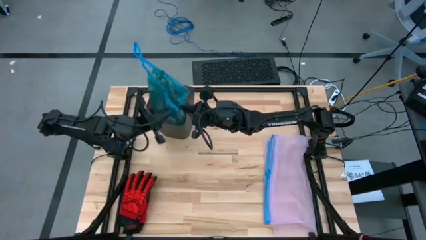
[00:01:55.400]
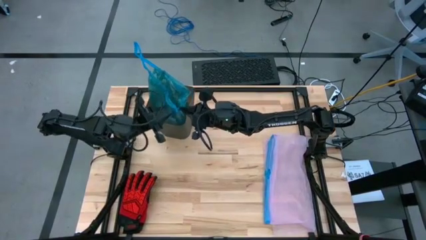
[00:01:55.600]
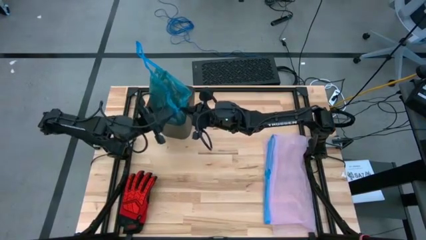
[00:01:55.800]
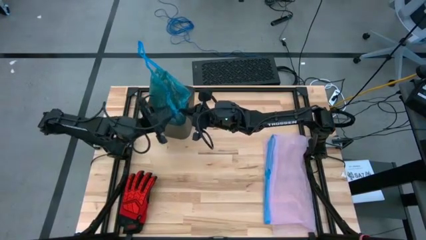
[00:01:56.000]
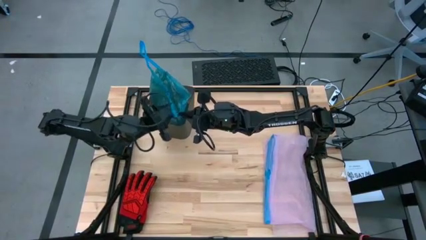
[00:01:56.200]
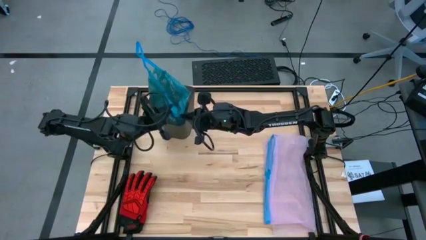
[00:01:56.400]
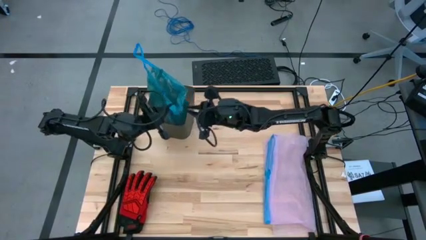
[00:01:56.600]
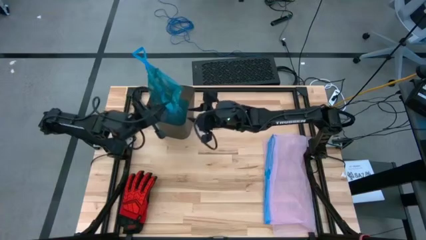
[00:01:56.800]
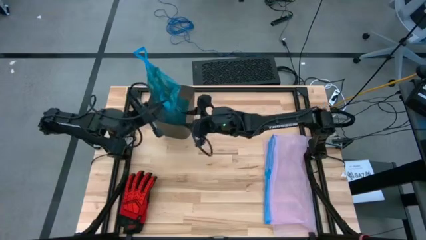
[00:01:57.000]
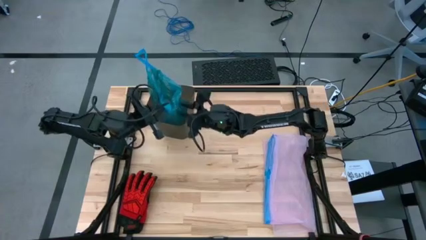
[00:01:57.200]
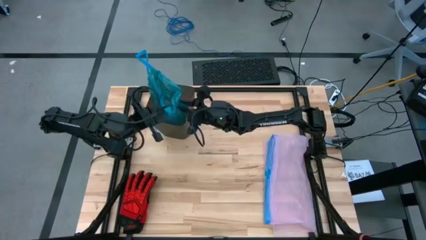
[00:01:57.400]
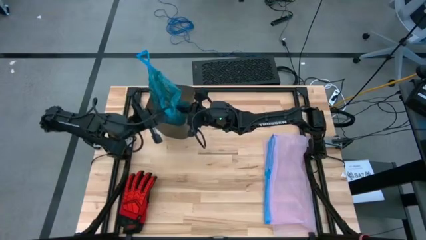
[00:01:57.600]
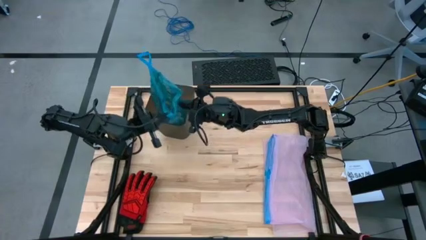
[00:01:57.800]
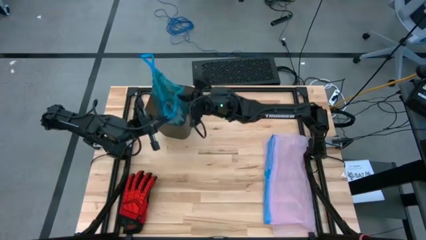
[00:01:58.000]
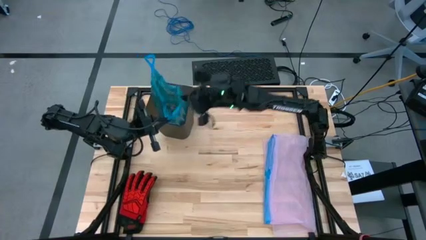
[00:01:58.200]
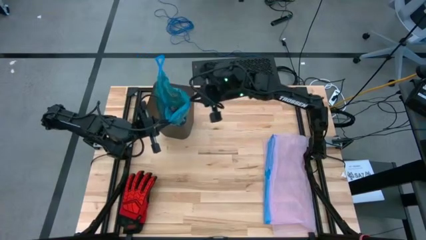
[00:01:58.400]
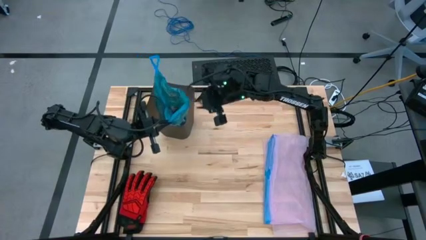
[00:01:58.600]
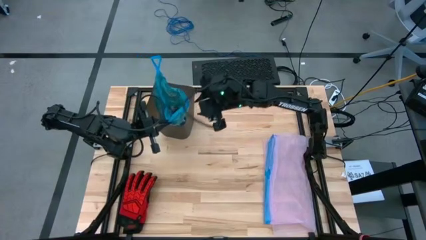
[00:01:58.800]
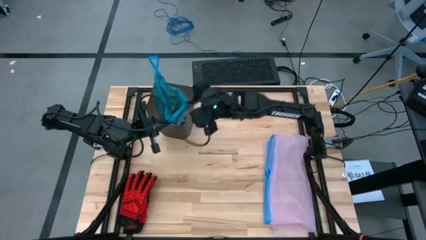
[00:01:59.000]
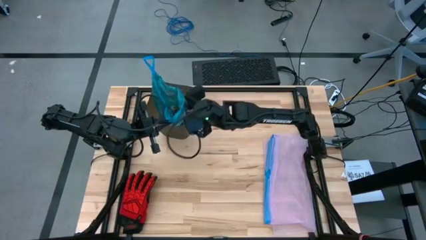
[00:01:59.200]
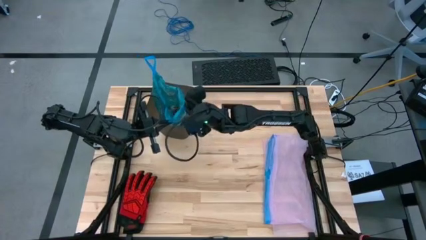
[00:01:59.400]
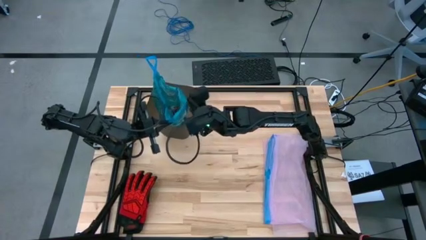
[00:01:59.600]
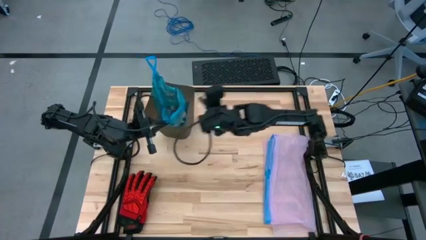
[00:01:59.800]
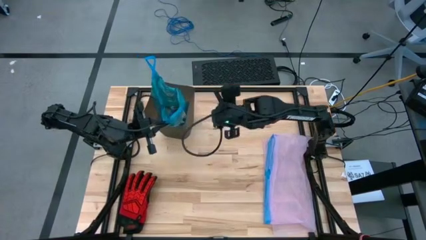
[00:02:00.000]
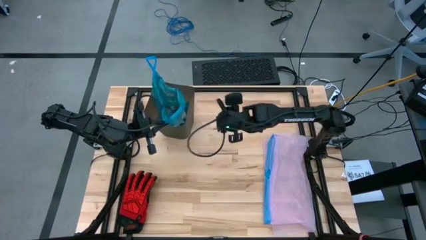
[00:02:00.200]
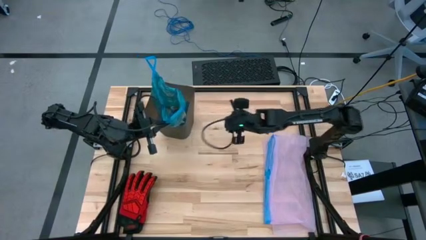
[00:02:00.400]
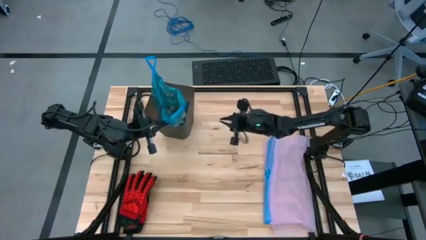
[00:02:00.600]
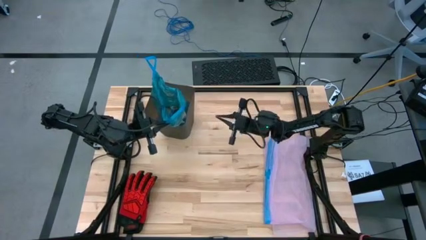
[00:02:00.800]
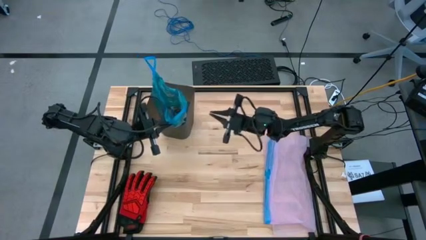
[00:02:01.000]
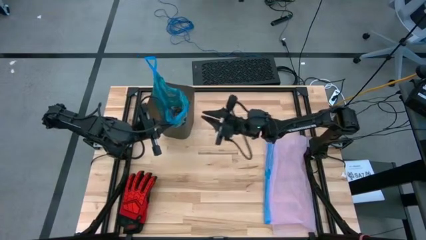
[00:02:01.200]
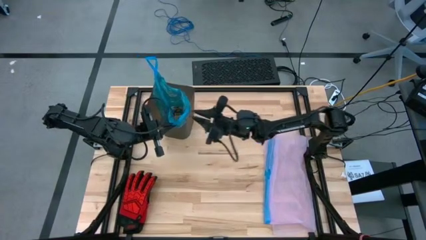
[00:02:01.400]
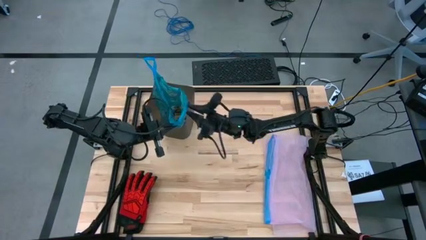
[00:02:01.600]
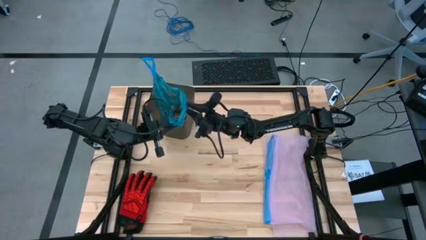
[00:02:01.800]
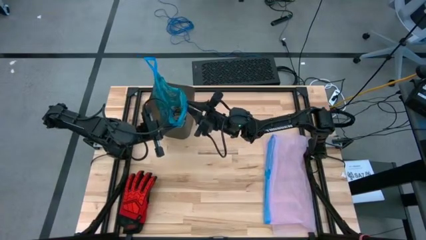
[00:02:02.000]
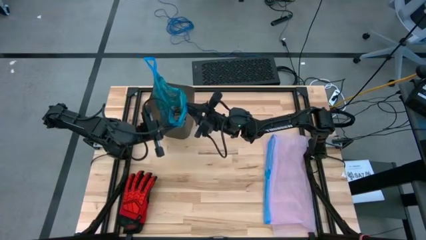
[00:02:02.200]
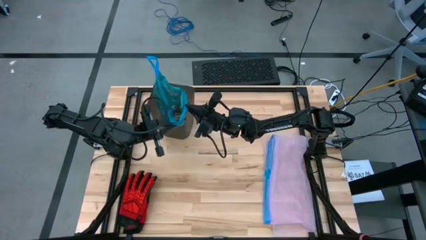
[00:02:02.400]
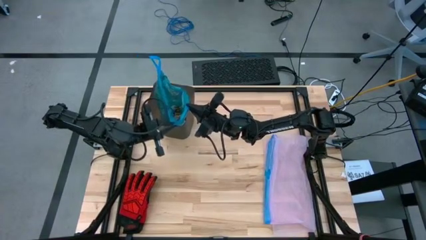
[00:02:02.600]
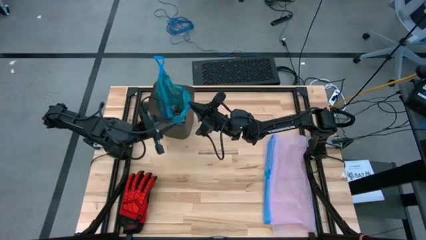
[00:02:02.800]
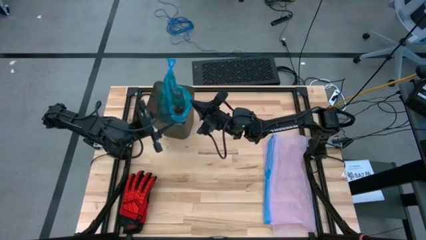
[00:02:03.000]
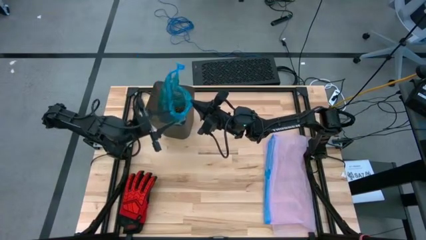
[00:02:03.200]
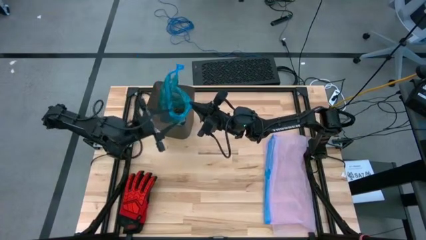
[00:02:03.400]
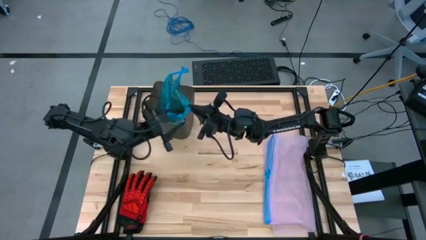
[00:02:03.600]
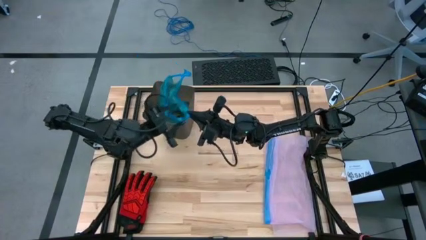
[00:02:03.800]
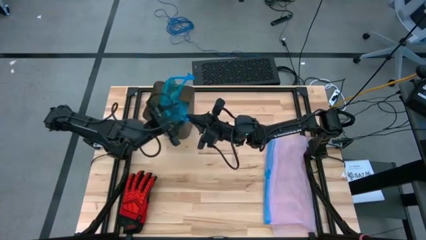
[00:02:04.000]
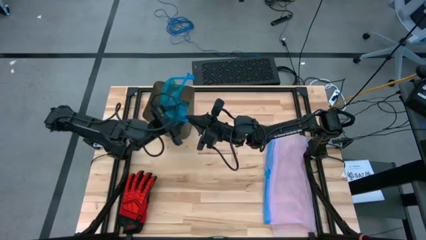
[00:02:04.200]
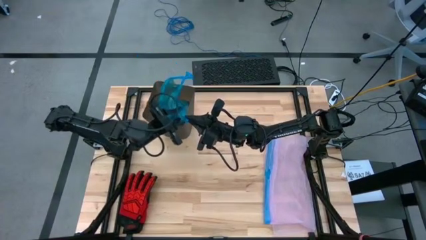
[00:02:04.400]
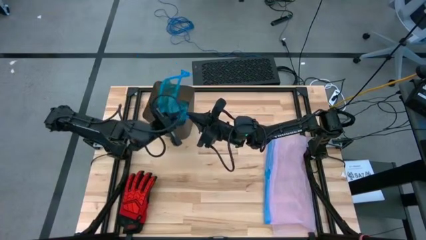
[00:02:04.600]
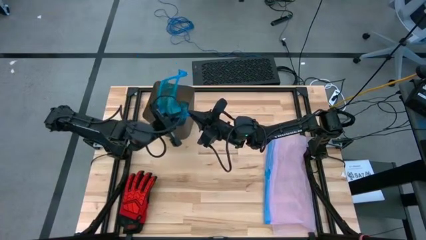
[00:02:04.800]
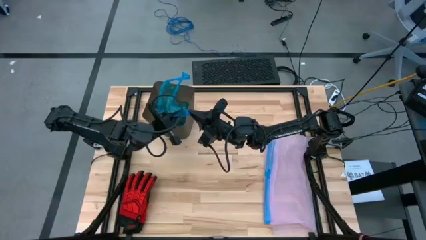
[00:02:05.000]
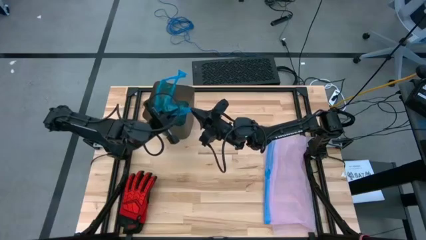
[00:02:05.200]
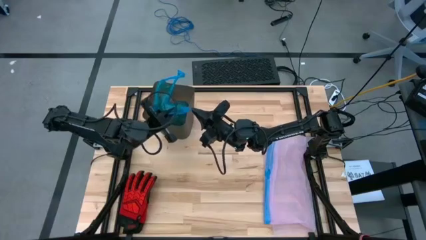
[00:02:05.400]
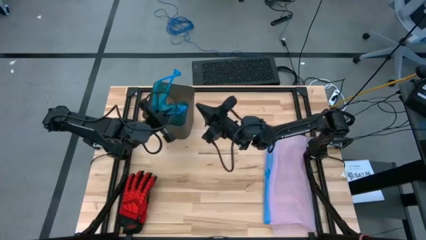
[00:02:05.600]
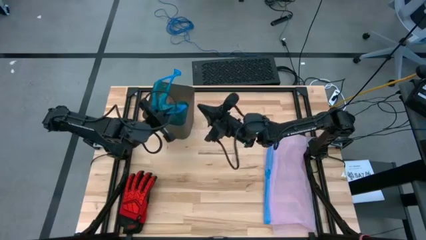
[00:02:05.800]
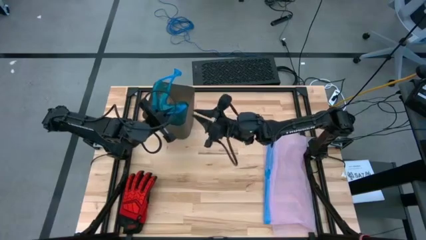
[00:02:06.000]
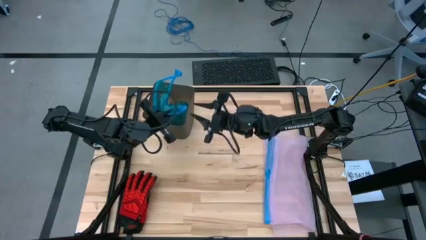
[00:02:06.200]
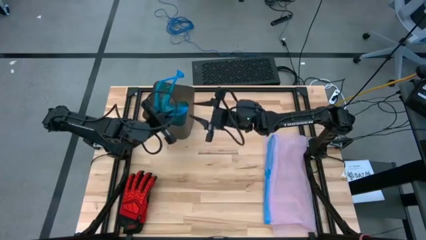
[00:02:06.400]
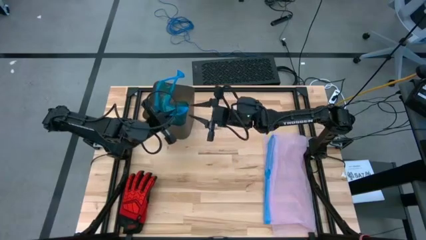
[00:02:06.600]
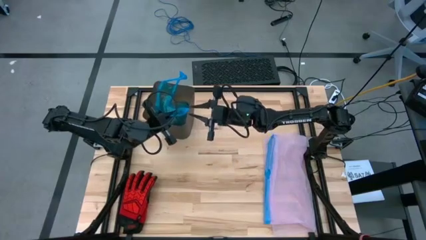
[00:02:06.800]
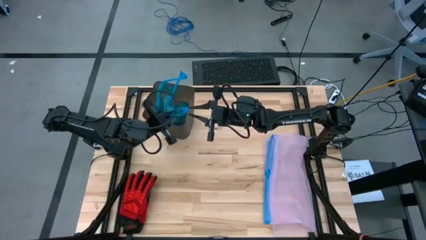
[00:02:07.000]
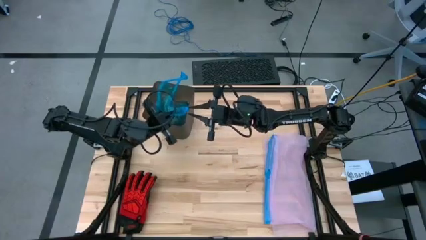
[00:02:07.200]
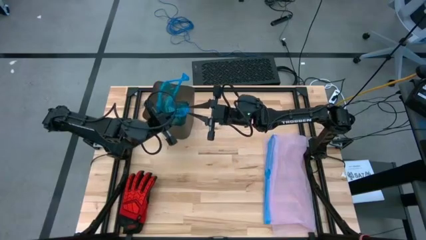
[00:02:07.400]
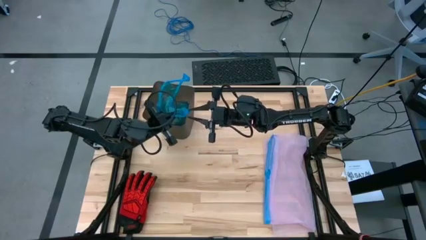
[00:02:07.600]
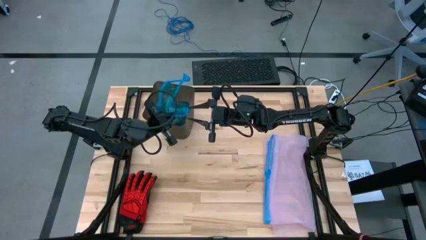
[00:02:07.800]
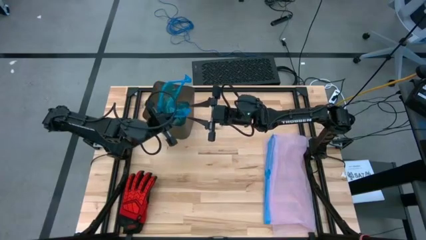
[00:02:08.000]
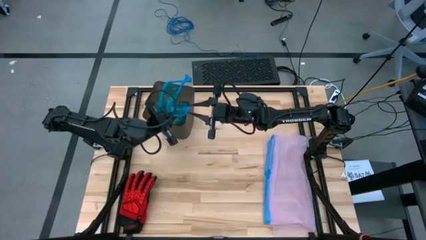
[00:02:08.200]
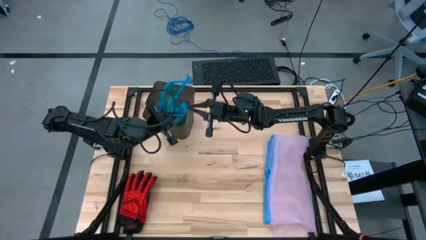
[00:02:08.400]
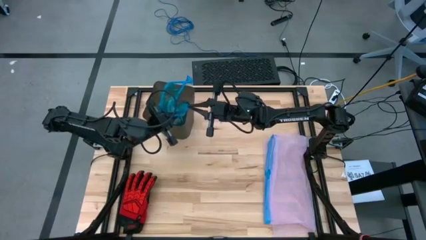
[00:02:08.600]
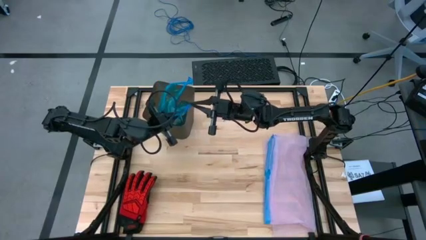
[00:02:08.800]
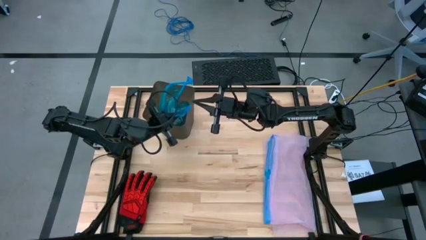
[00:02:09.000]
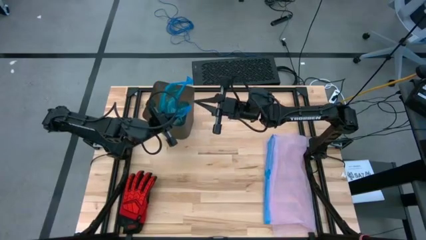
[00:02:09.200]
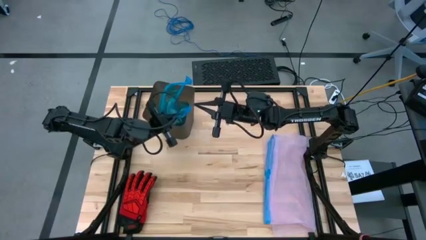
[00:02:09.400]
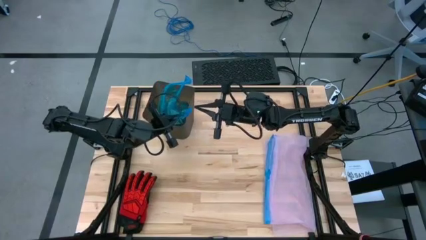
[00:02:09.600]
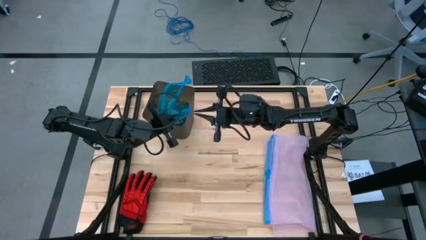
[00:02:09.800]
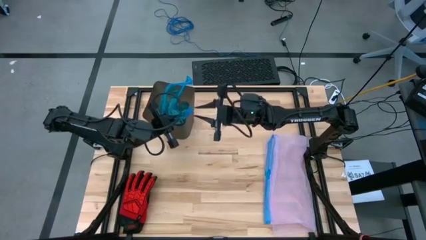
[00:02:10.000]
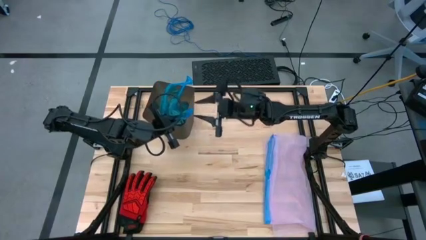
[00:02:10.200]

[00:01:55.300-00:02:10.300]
Task: place trash/remove bag and relplace
Remove the trash bag from the trash bin

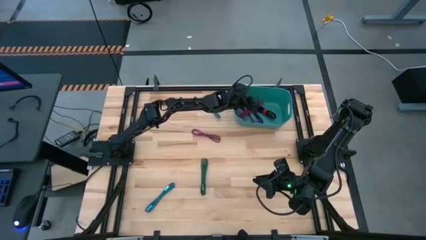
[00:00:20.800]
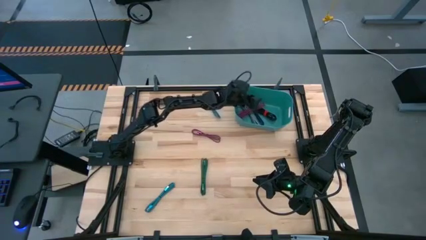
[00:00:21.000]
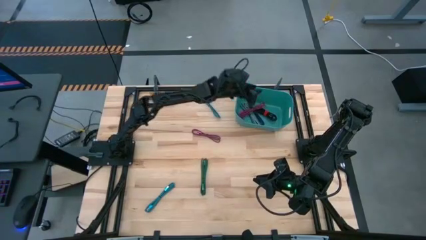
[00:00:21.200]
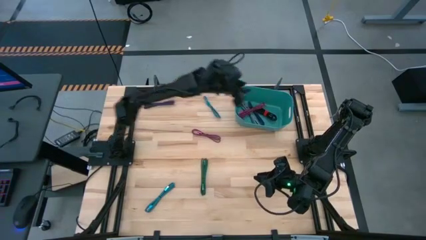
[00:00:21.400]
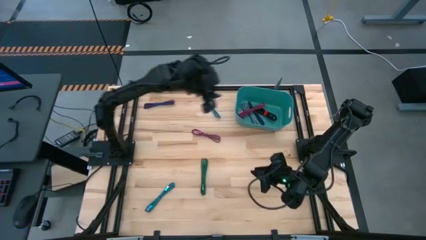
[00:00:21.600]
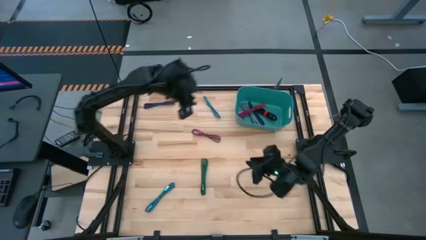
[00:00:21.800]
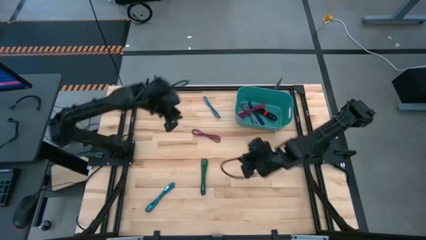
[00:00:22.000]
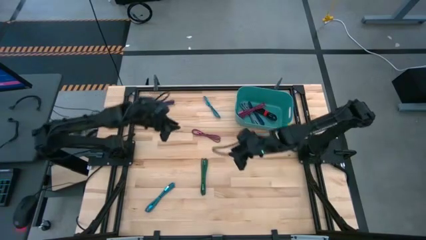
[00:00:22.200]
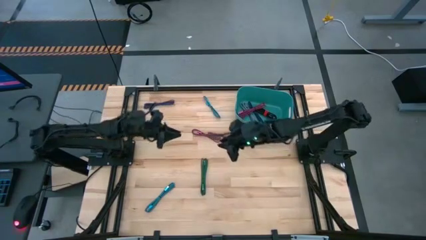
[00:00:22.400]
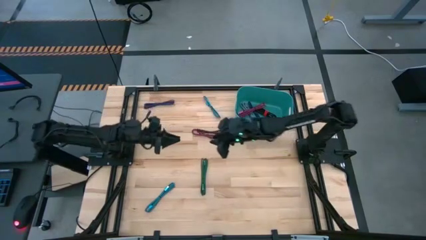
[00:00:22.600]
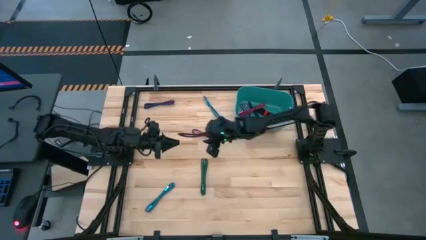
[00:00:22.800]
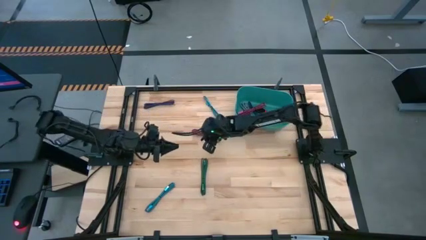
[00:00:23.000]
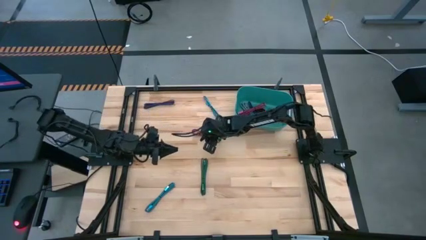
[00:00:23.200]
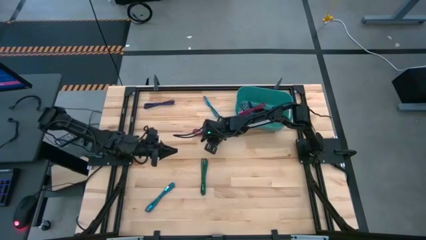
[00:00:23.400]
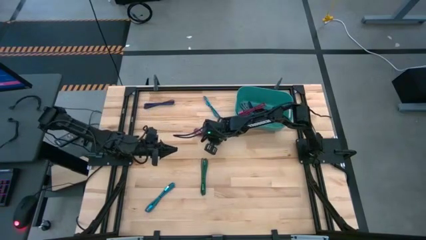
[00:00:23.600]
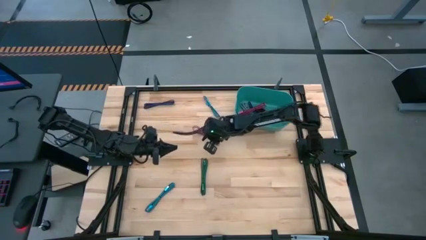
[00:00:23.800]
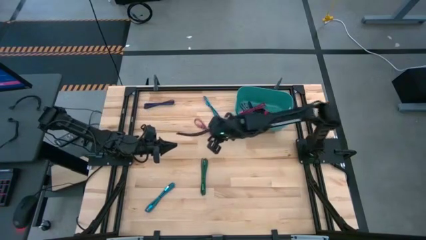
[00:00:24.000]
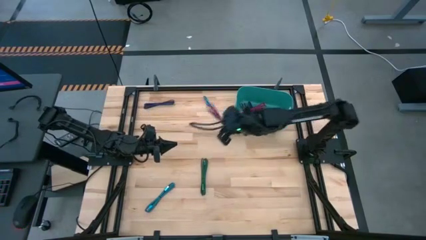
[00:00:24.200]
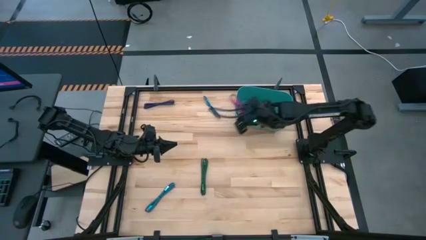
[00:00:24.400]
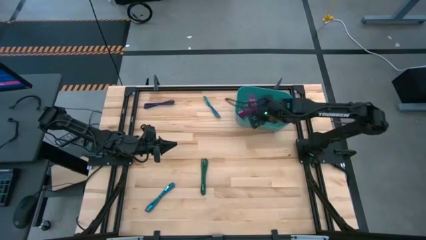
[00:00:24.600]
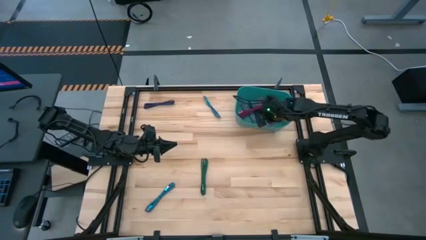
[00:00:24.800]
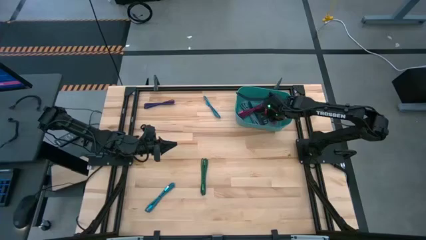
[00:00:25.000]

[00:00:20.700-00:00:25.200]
Task: Pick and place USB-C Cables
Put the pink charger cable into the light blue bin
